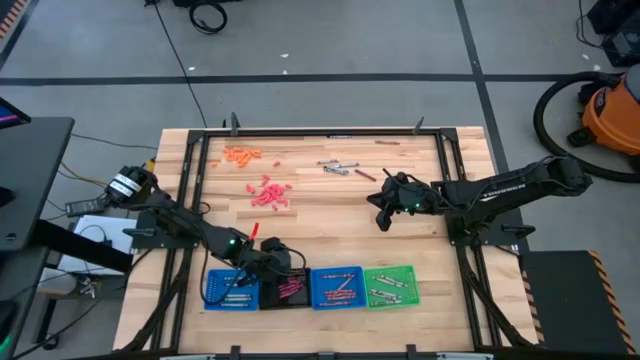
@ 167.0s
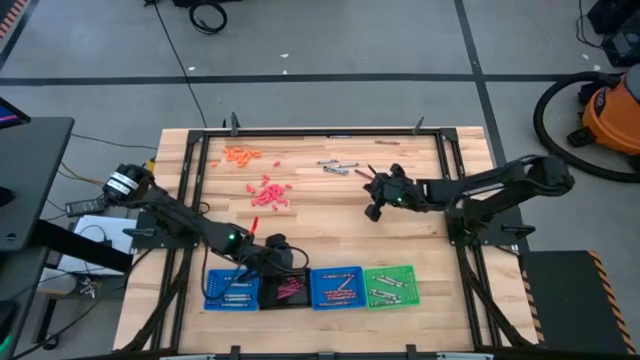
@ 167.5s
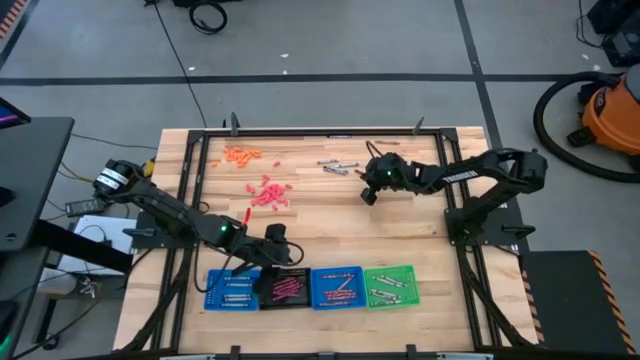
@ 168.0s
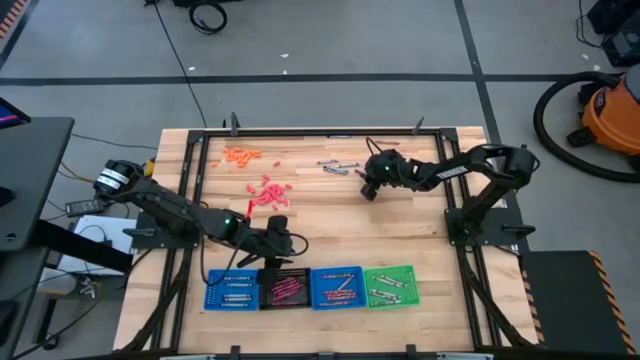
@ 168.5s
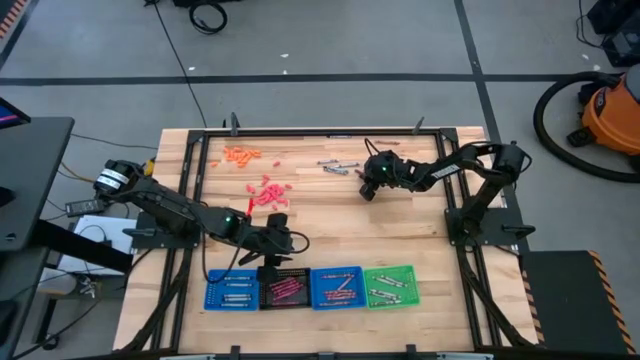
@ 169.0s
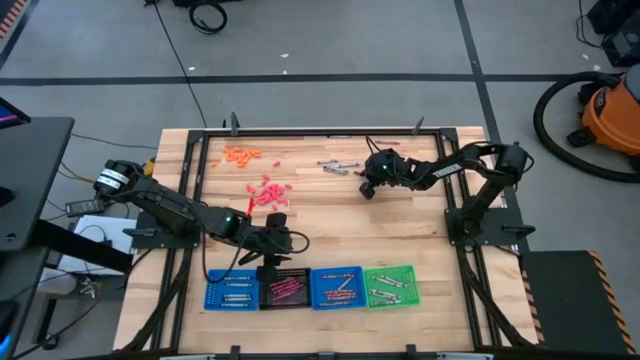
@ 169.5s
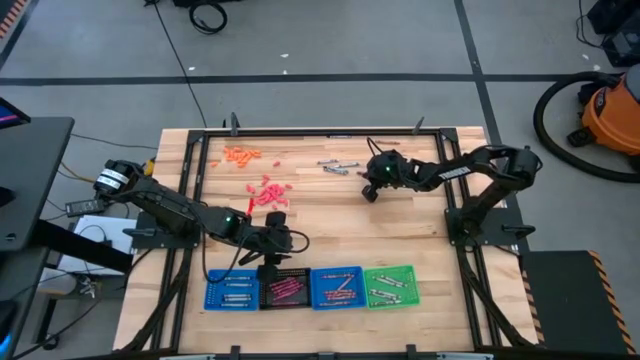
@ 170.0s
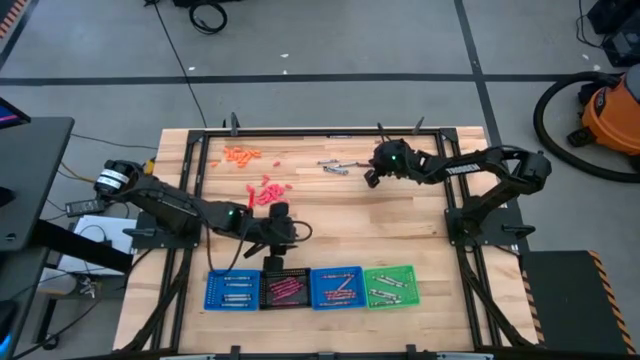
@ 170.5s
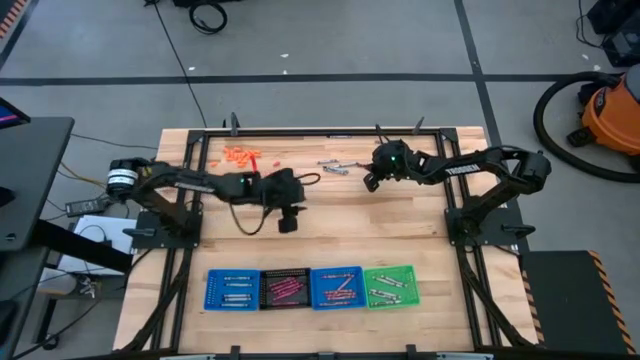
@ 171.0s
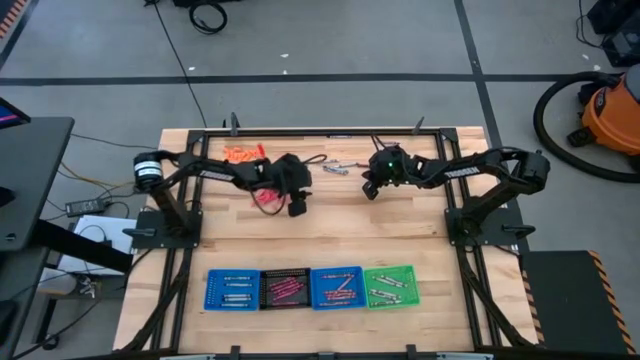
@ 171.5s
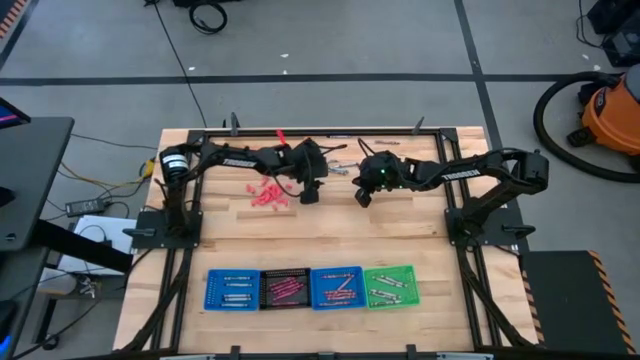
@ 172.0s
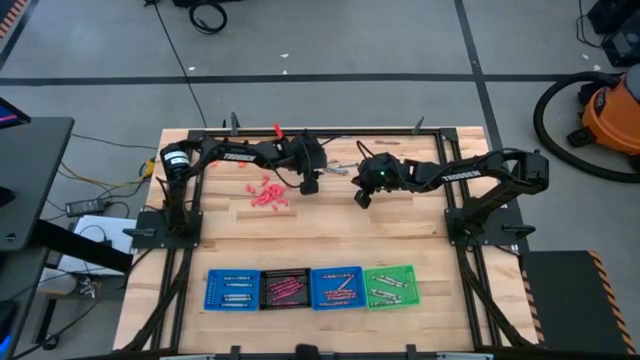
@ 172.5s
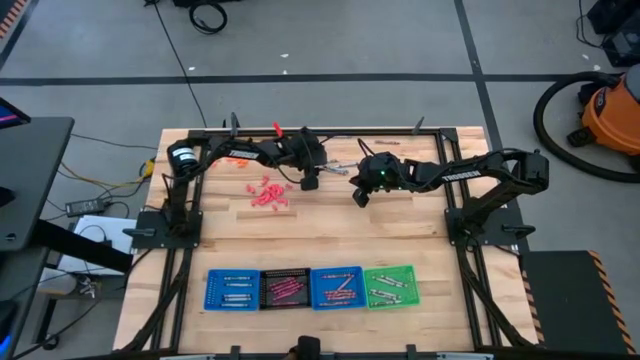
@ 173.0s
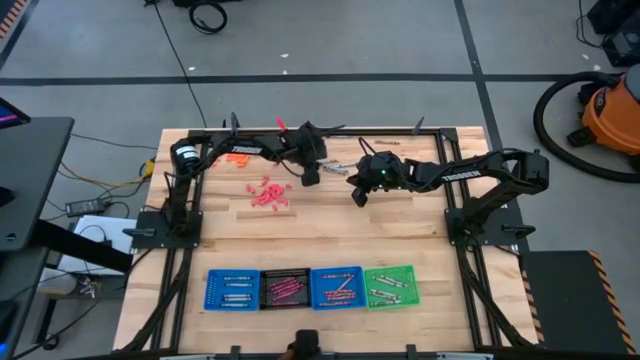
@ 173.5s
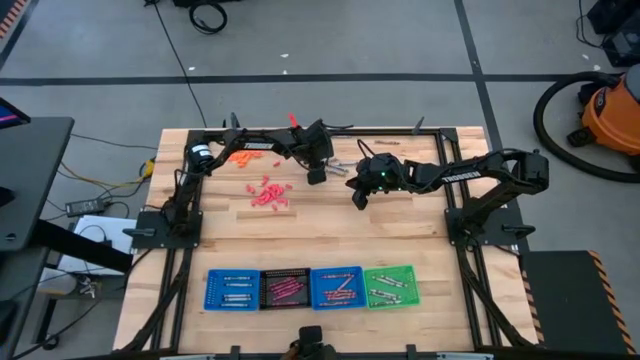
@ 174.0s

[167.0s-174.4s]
Task: Sort crayons
Put the white crayon into the green bin

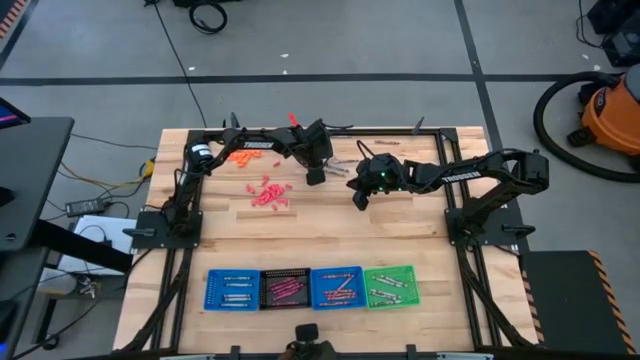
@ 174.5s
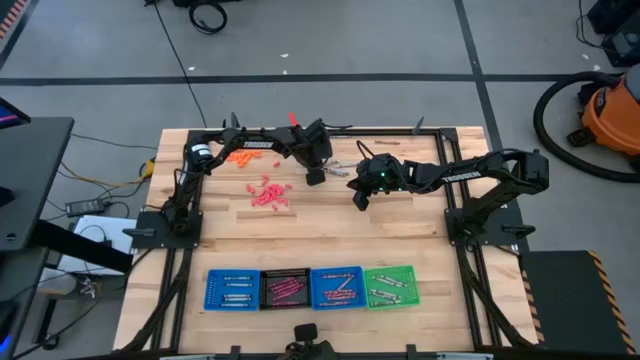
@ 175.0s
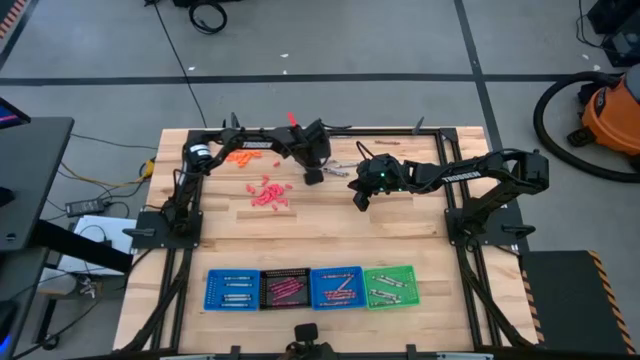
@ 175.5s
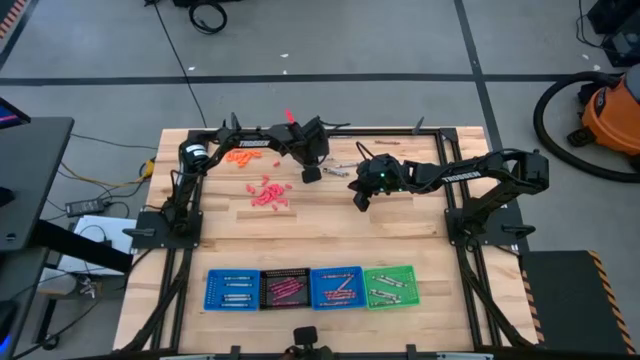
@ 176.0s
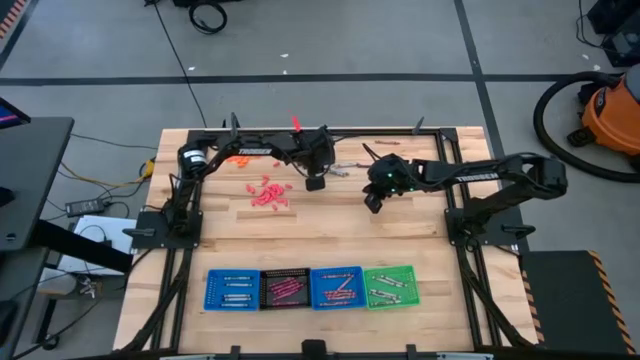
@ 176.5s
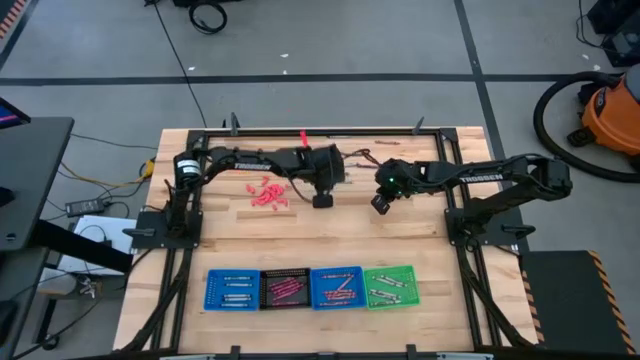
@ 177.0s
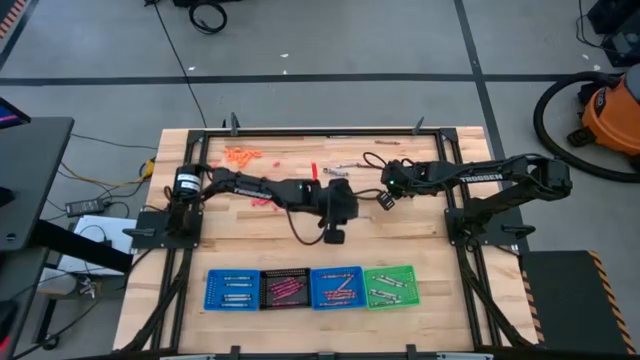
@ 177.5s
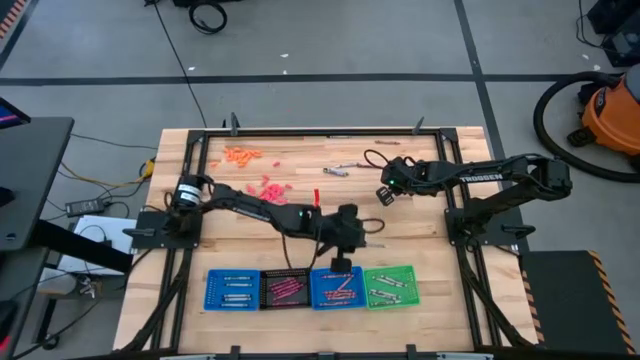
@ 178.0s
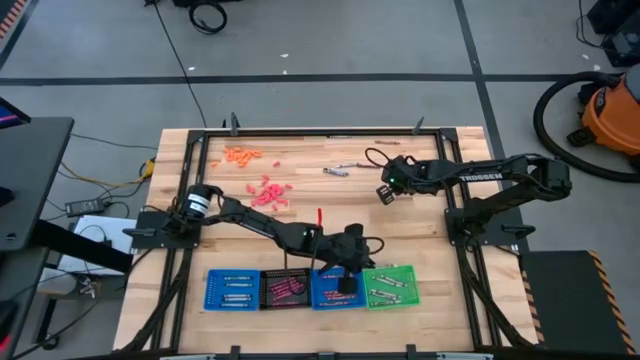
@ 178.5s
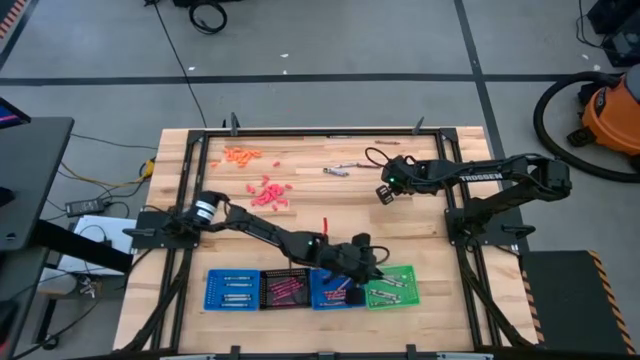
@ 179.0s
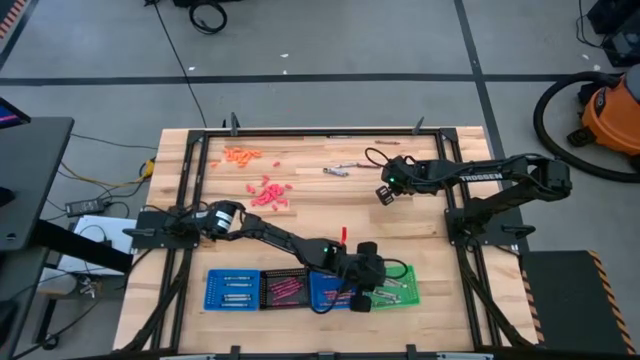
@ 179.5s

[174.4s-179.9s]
Put the white crayon into the green bin

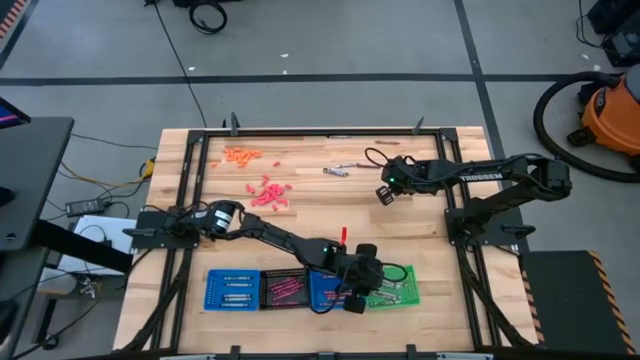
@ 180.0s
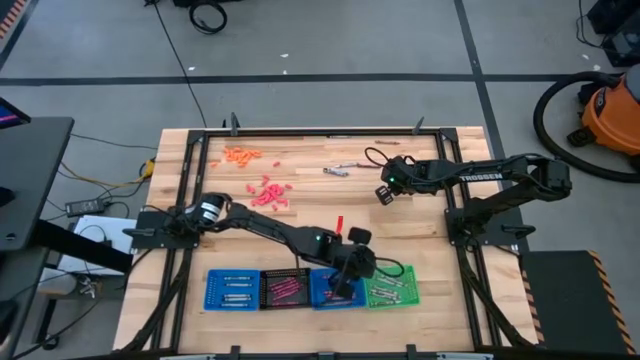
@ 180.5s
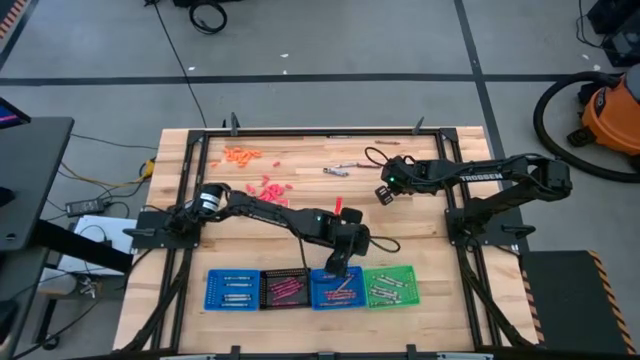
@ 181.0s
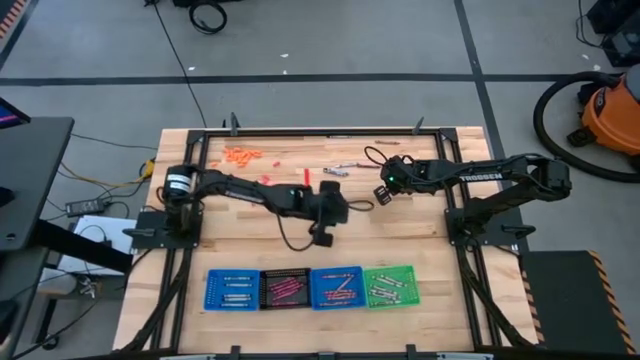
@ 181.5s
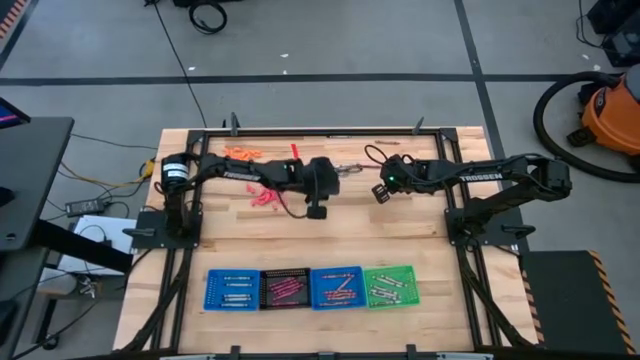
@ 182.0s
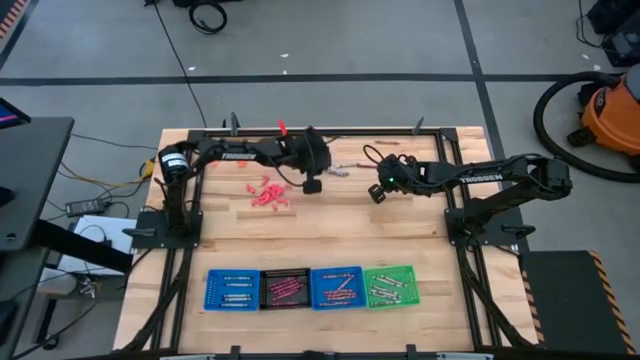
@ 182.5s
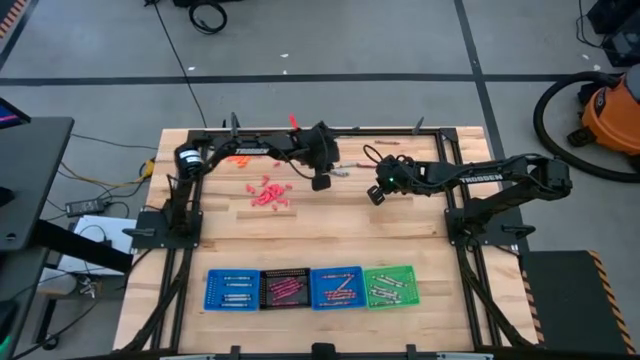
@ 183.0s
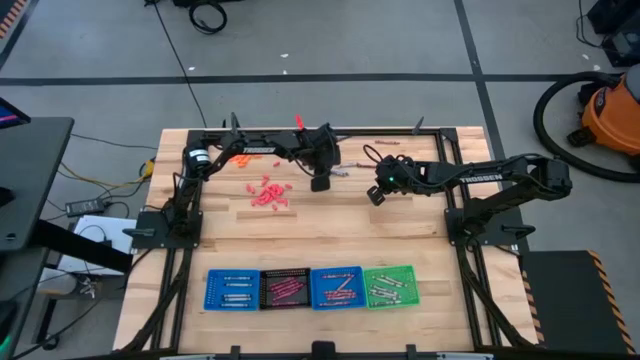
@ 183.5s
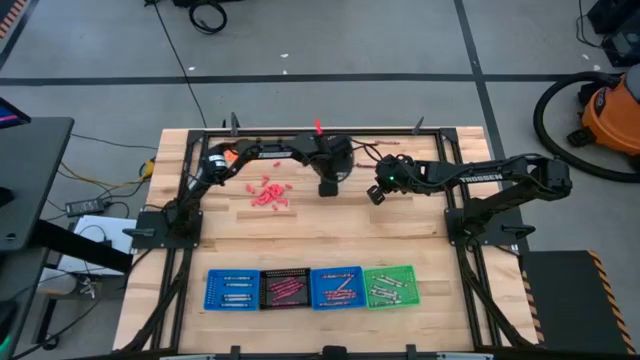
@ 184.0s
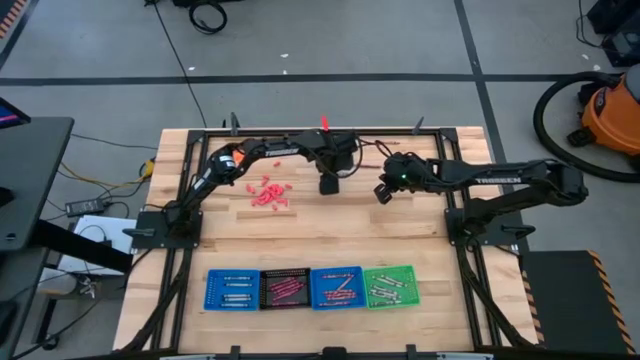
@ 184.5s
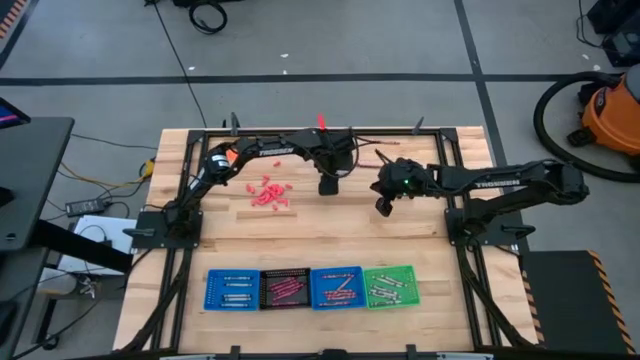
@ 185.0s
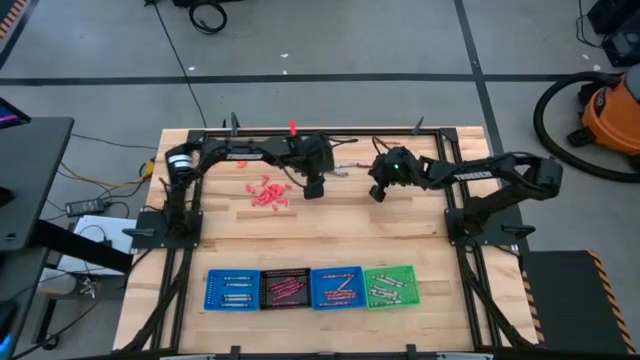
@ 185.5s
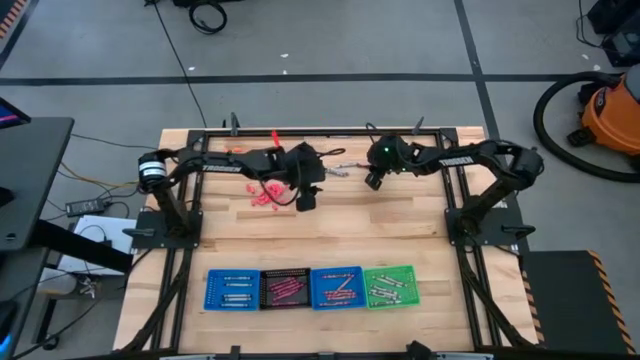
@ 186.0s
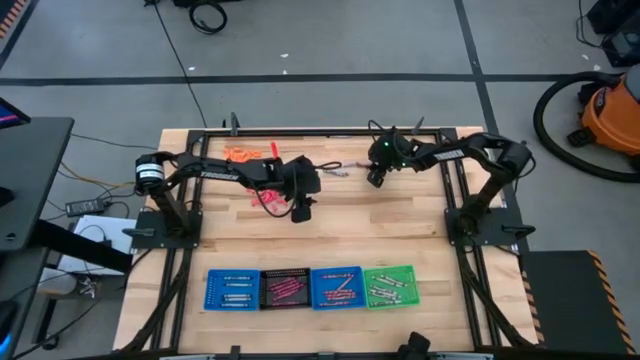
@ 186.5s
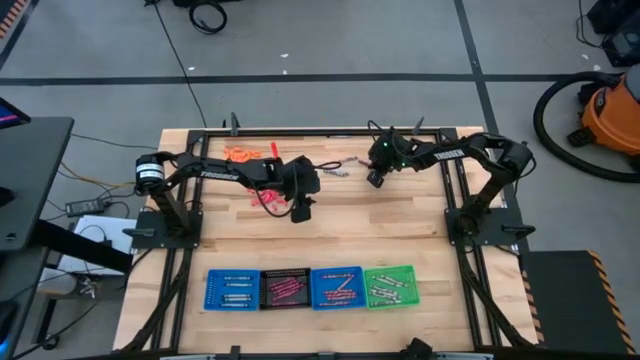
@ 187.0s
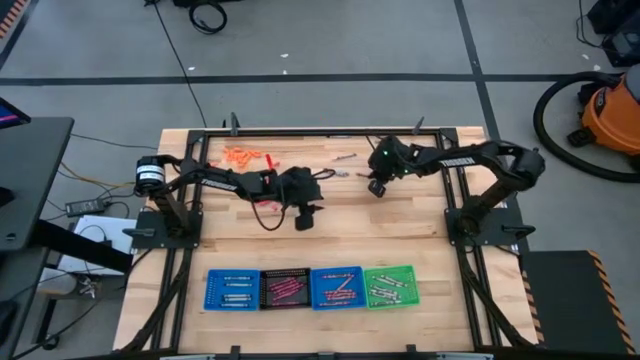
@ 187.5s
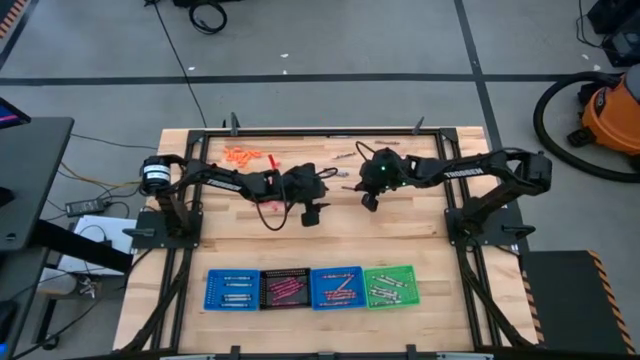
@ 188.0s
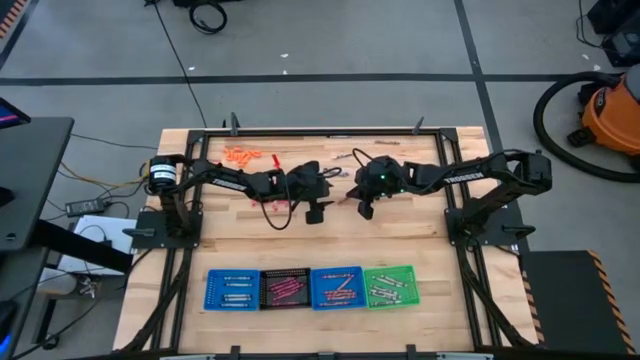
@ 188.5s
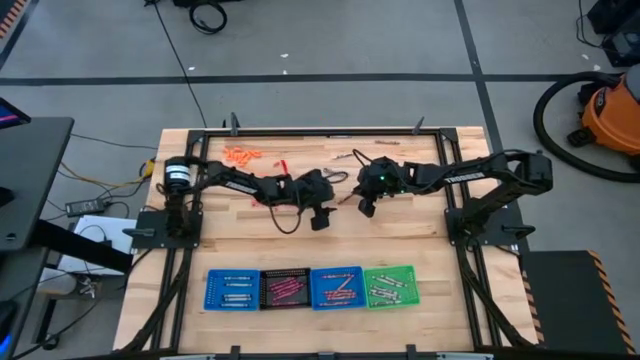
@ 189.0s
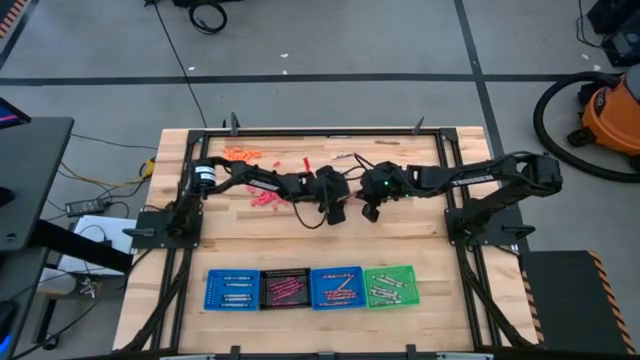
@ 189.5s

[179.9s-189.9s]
Put the dark pink crayon into the black bin
